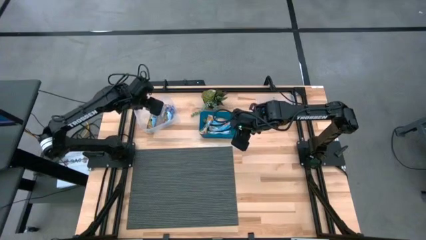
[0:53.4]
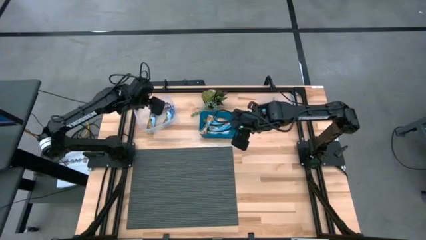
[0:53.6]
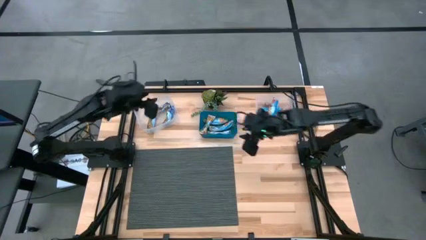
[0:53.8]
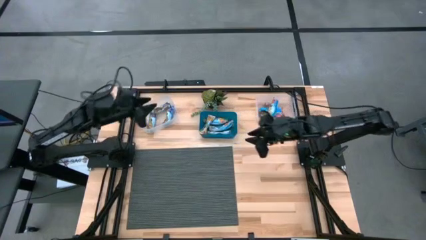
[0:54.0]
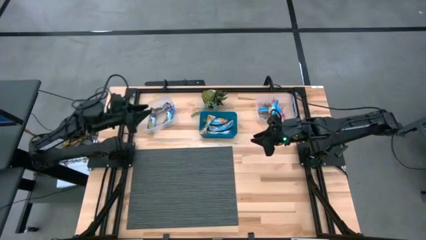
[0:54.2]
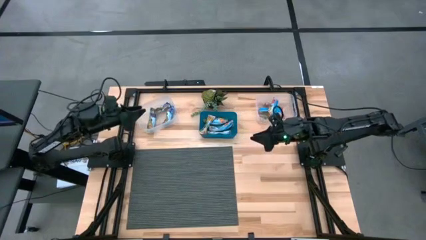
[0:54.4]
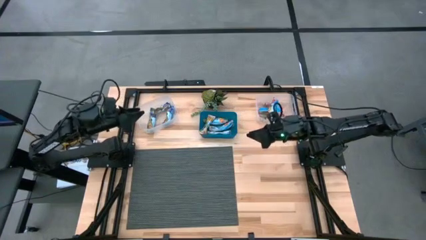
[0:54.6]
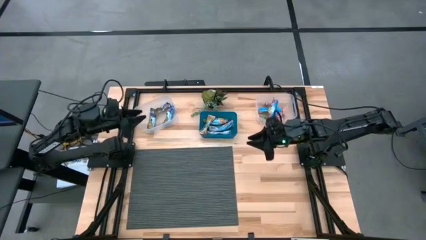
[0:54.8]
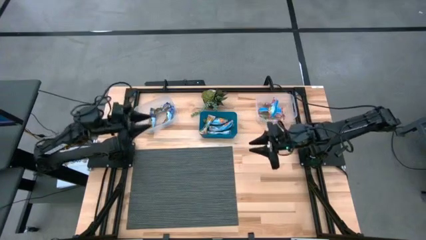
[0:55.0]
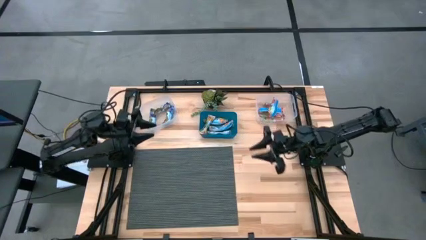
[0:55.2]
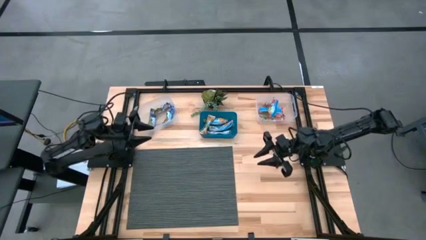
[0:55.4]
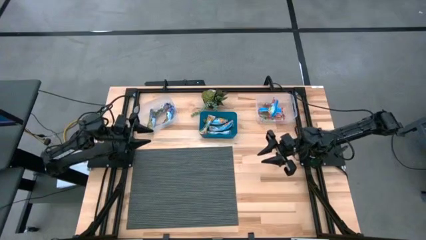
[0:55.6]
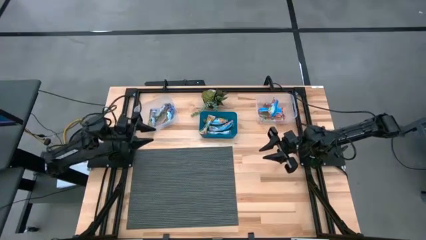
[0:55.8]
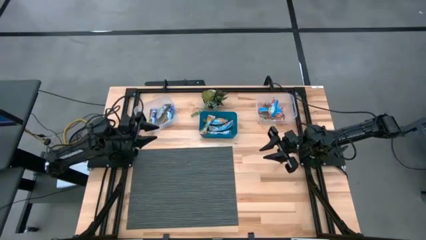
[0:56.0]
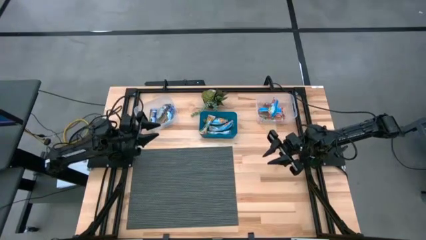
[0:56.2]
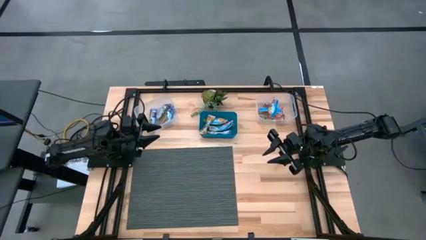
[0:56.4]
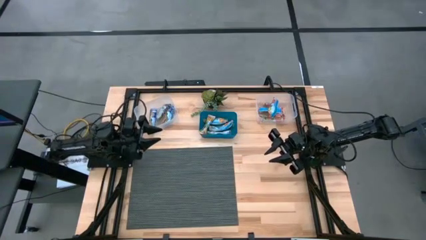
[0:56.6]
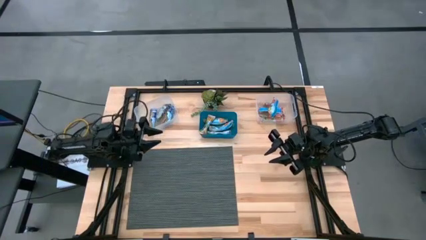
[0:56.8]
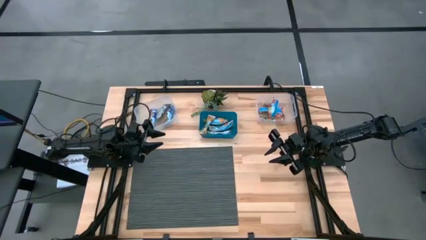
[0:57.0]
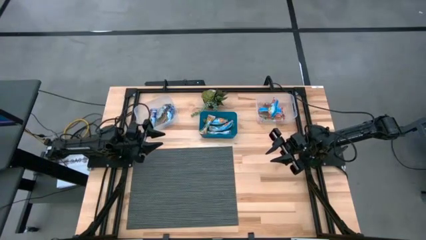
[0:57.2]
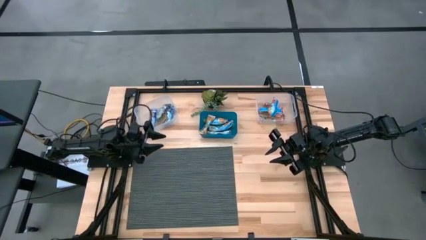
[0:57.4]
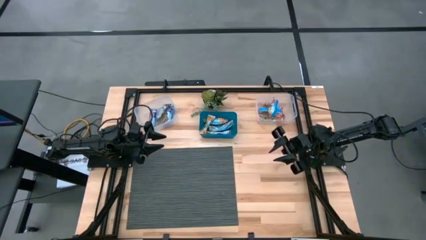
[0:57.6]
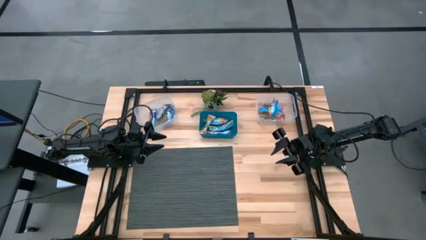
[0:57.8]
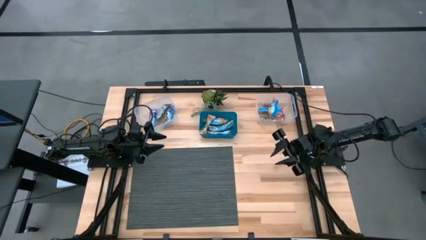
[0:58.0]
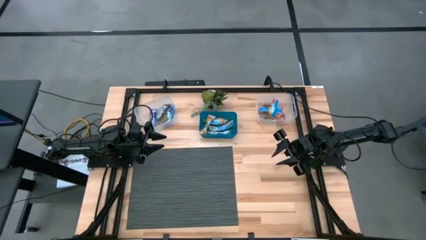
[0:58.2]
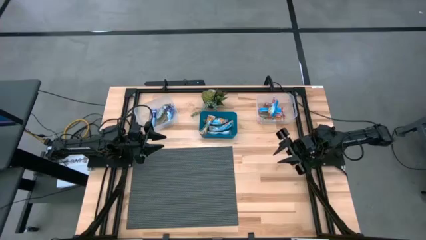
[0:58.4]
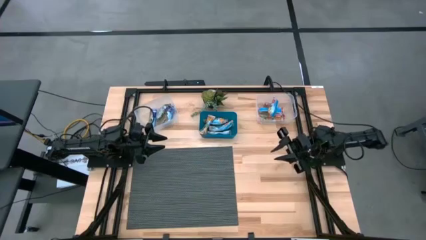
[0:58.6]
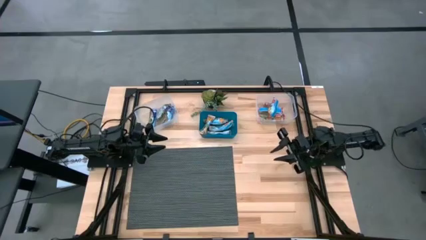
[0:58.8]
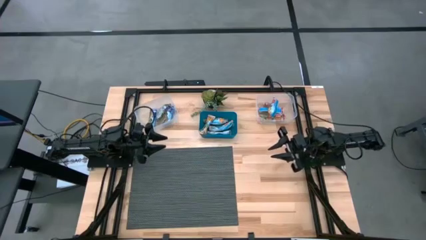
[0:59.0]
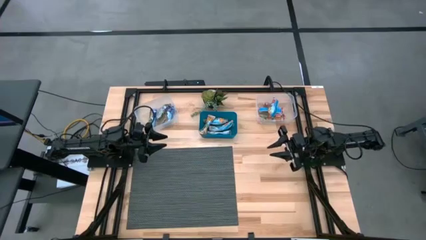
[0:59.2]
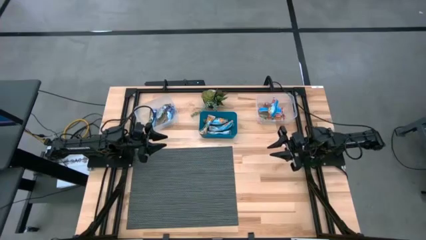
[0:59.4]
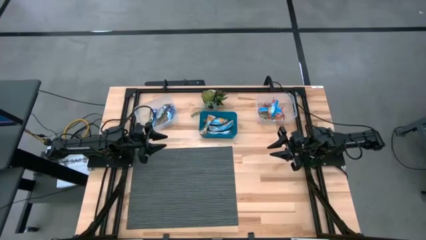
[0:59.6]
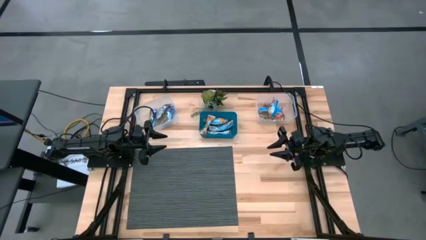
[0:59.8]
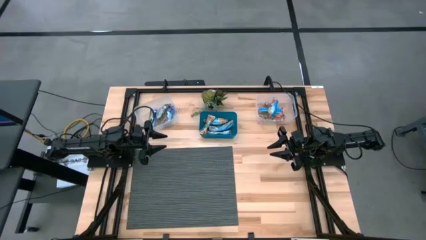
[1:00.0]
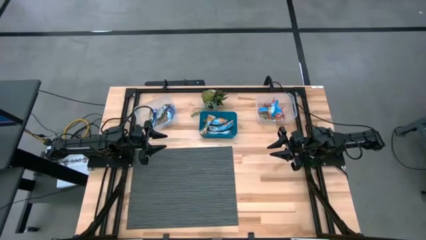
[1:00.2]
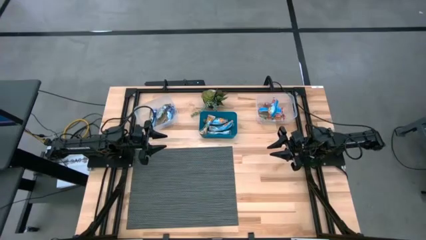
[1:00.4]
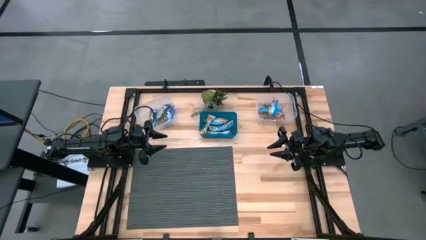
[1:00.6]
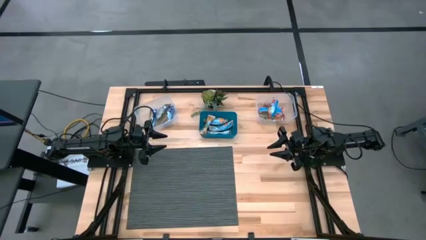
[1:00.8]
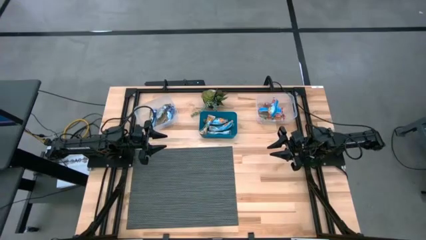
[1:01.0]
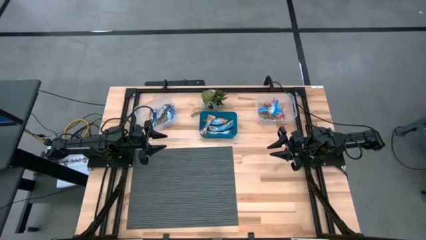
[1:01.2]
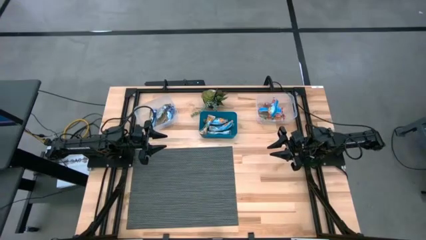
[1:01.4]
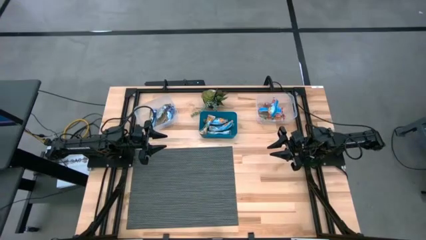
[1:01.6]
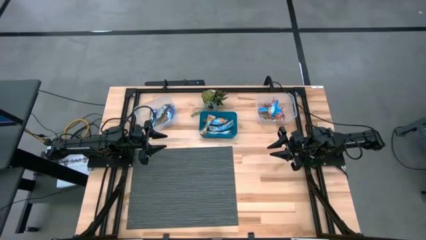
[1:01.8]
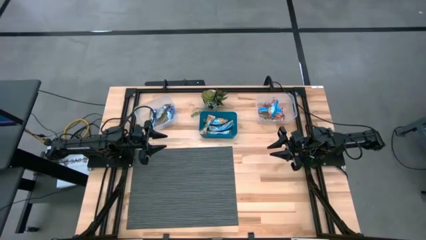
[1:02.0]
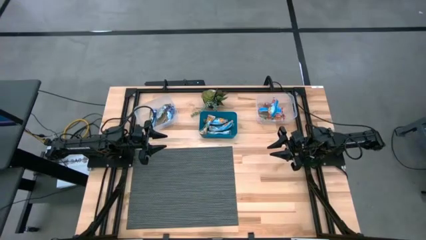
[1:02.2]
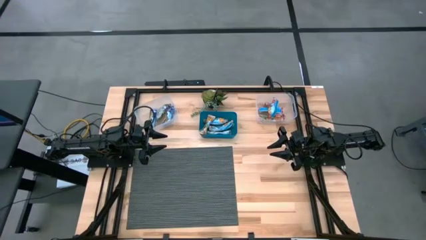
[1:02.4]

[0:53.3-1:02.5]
Task: Pick and place Granola Bars by type
Return to Home Position

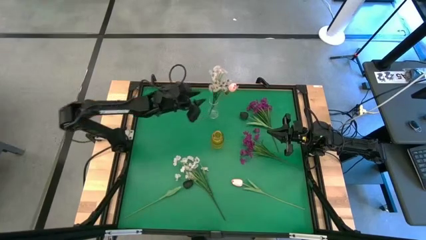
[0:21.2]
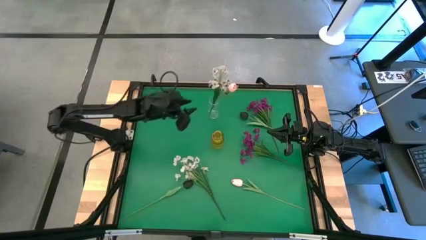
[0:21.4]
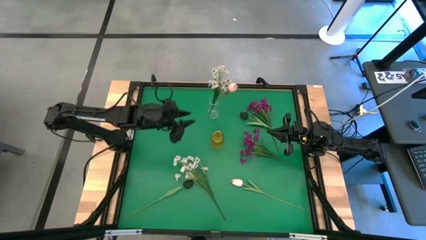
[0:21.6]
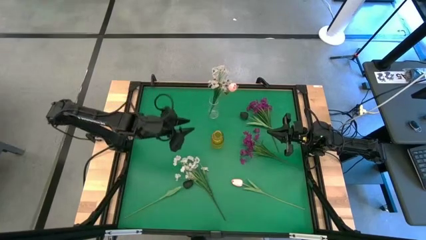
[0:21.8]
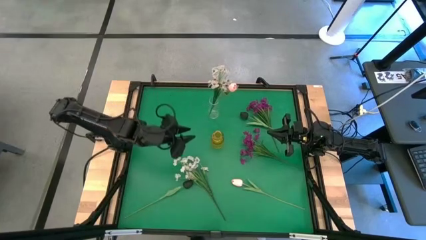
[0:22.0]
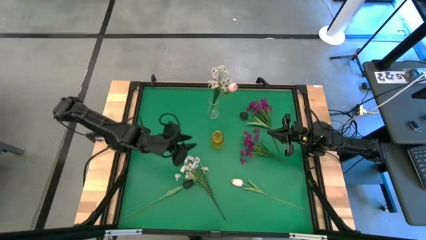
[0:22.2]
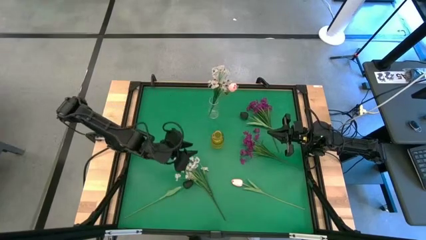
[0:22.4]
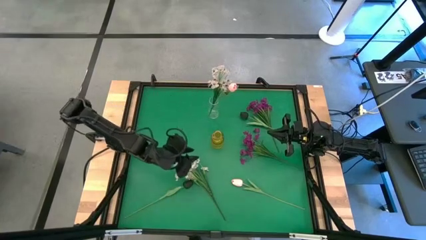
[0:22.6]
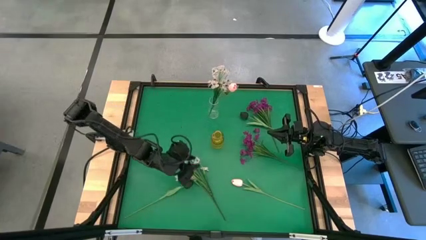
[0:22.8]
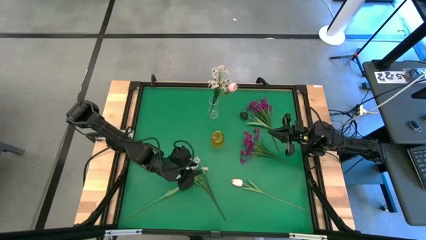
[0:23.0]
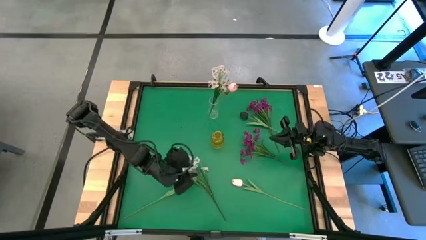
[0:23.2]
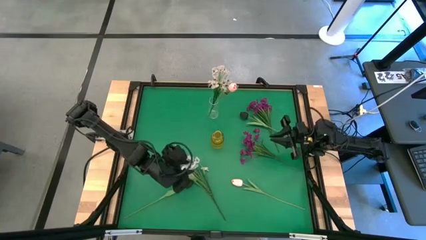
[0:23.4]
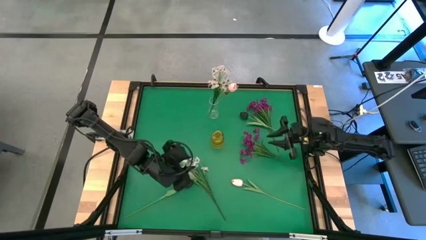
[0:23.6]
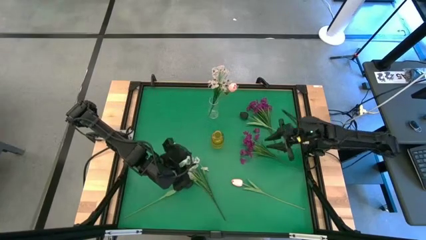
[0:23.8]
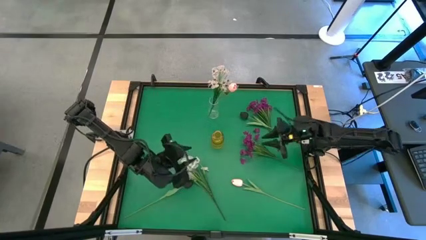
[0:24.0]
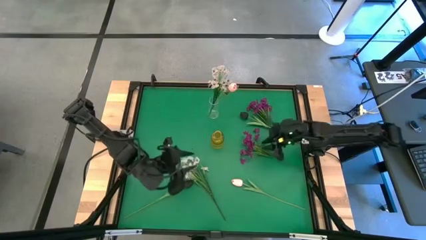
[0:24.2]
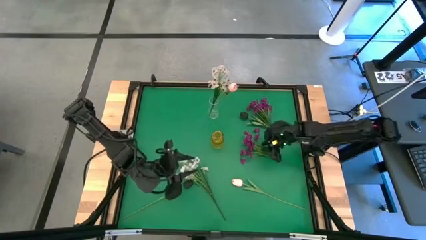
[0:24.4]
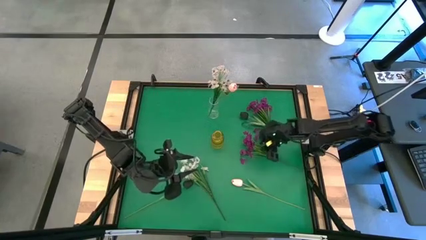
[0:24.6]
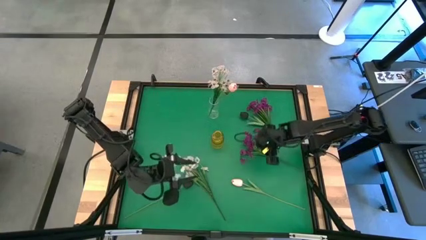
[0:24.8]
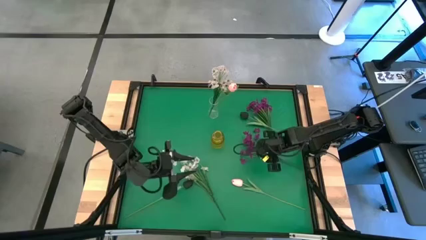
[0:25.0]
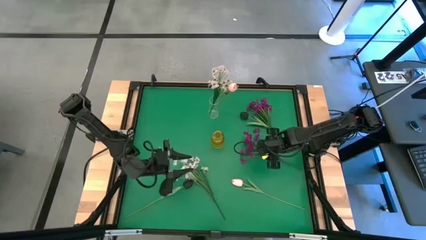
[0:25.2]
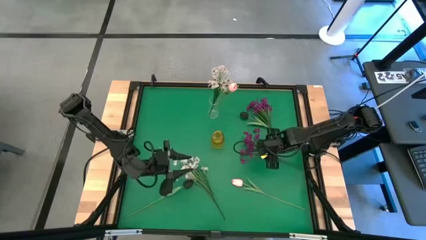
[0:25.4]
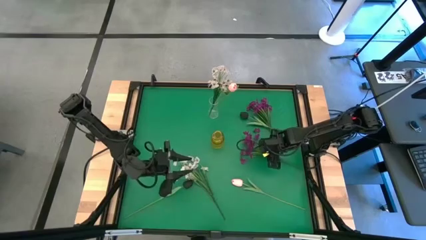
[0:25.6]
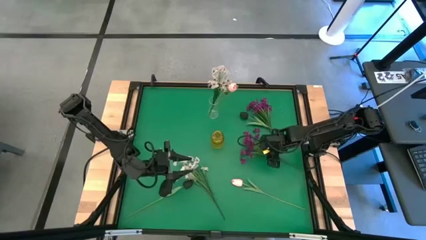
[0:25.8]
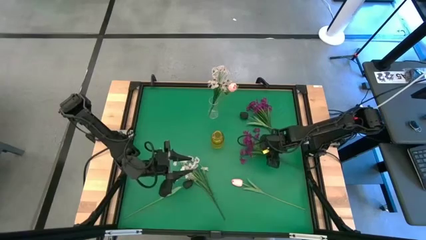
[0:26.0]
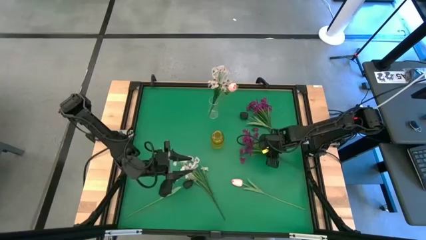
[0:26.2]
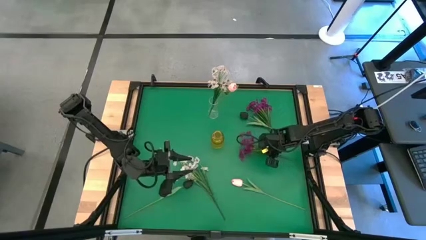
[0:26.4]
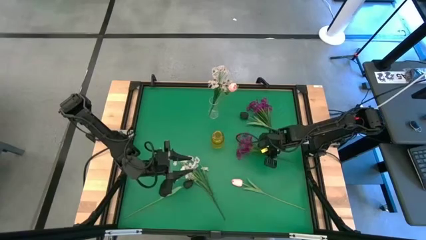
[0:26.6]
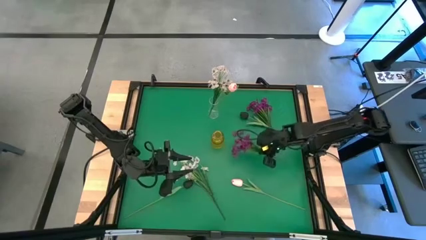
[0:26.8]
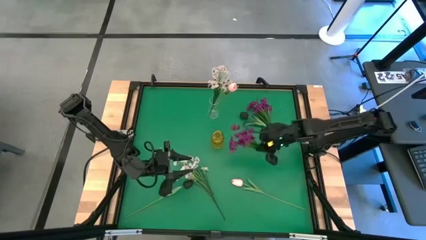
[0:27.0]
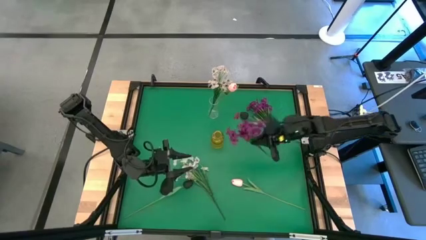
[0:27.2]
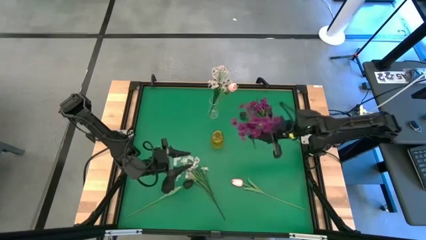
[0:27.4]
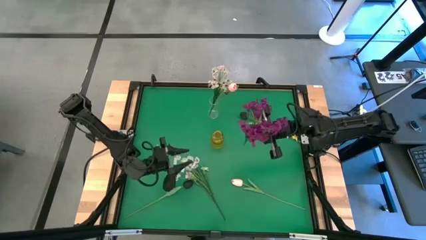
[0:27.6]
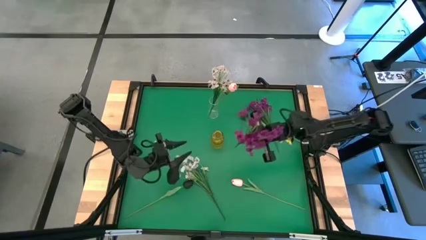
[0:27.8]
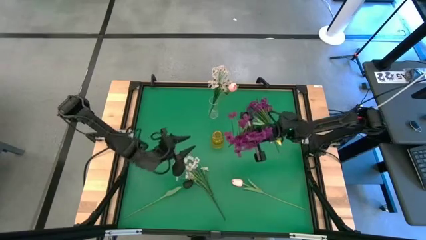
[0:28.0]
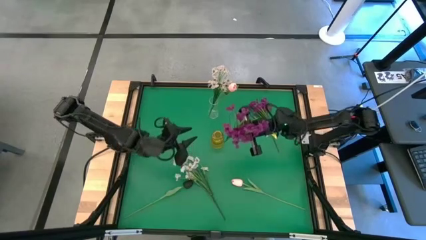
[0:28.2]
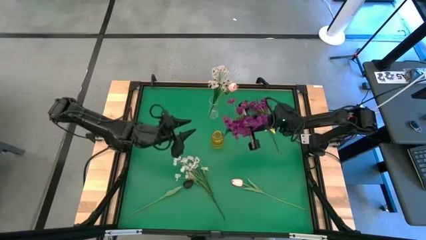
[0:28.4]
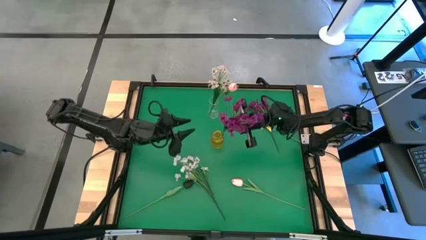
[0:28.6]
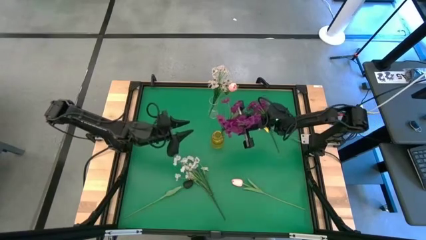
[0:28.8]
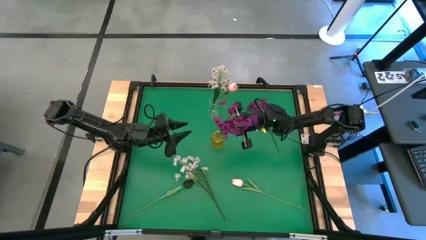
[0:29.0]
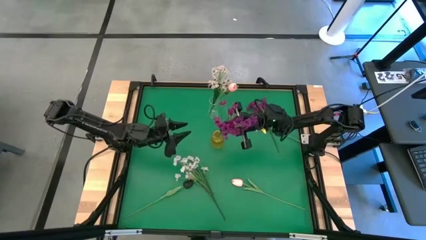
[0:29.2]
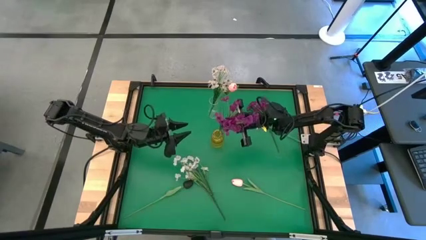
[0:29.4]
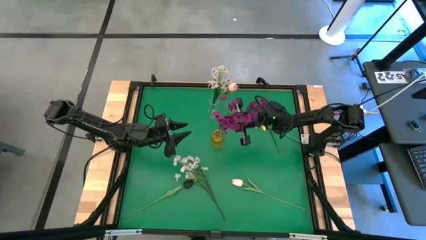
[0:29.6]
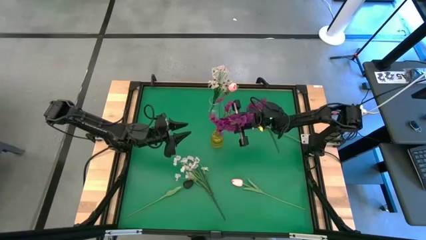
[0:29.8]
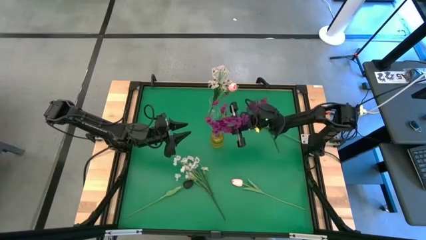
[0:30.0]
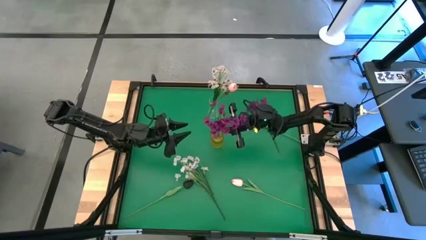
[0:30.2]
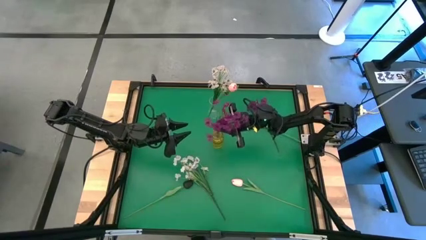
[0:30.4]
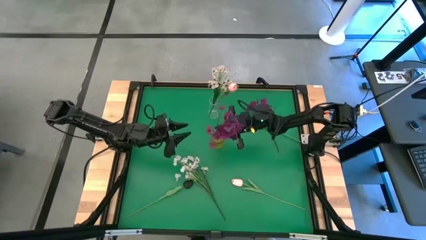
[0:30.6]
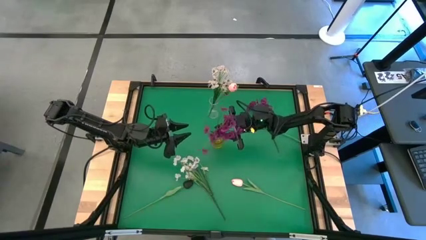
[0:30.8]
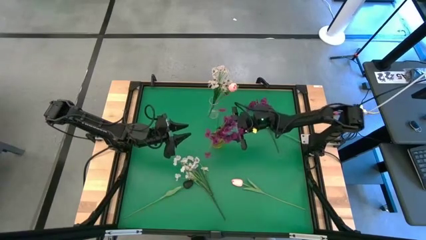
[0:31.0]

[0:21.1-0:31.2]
Task: Sort flowers into vase by color
Put the bottom purple flowers into the yellow vase
